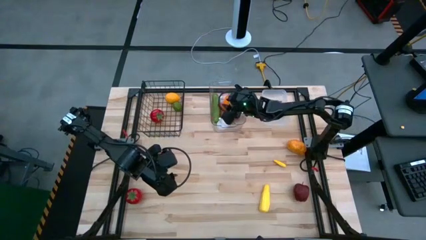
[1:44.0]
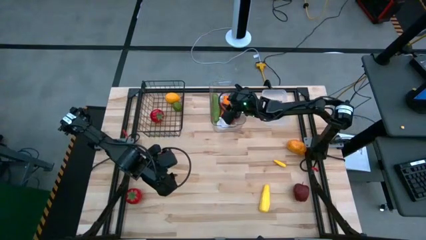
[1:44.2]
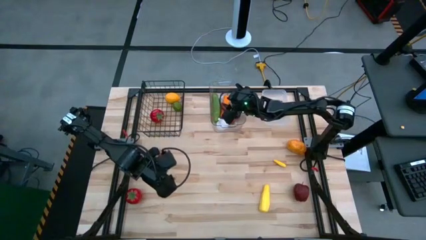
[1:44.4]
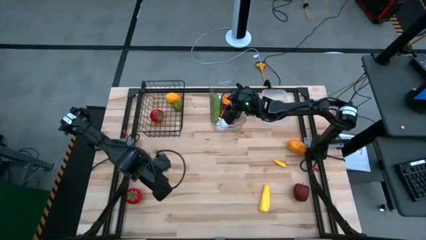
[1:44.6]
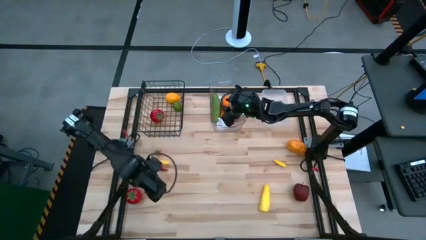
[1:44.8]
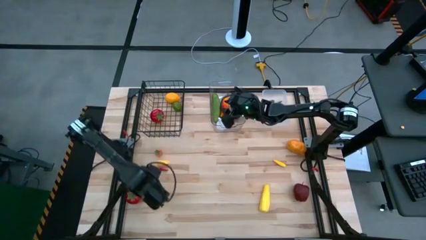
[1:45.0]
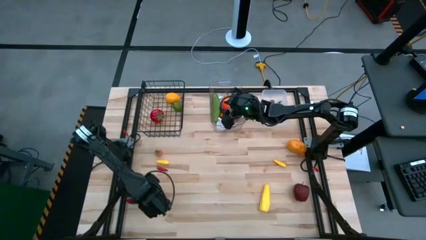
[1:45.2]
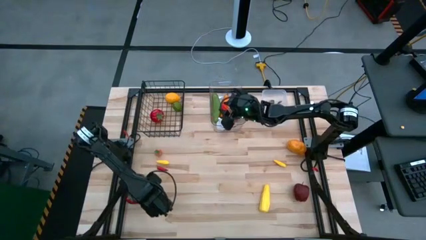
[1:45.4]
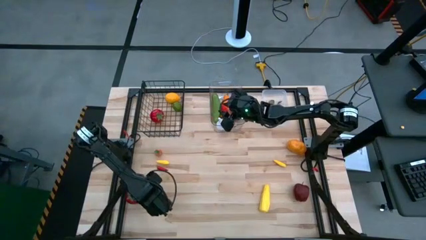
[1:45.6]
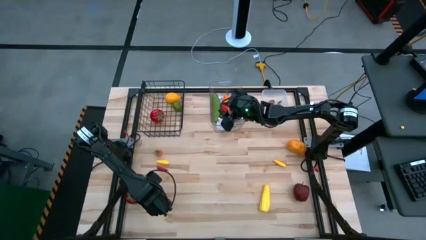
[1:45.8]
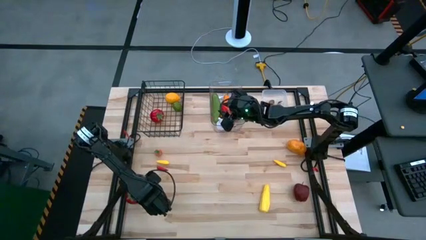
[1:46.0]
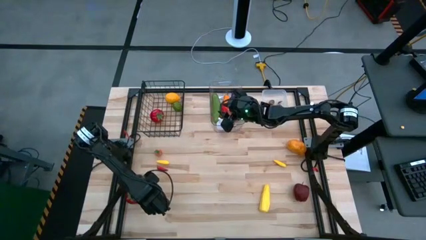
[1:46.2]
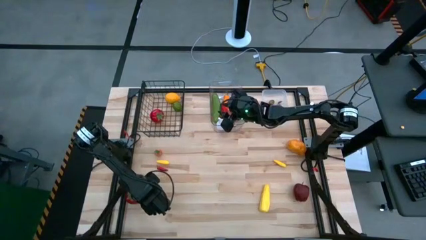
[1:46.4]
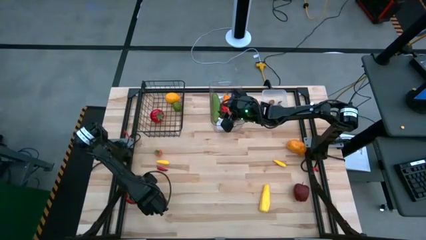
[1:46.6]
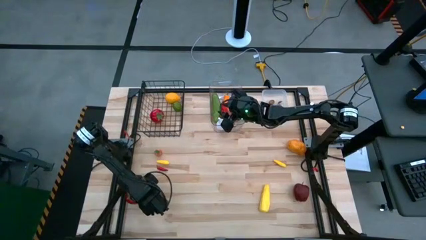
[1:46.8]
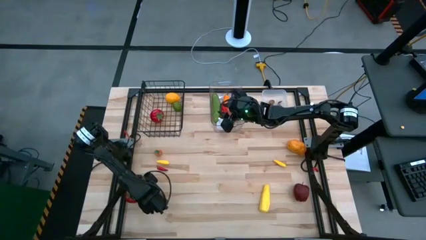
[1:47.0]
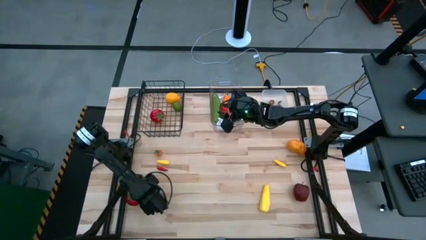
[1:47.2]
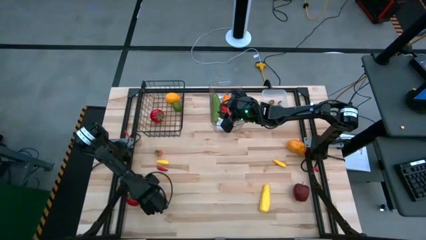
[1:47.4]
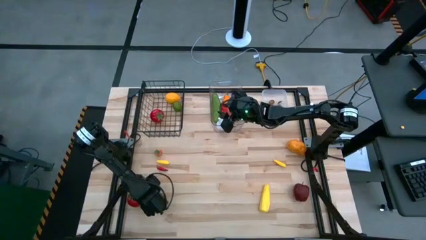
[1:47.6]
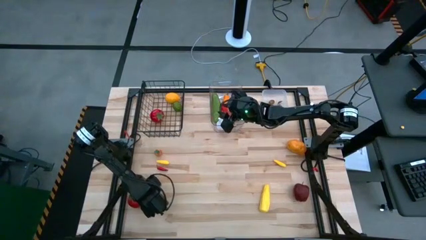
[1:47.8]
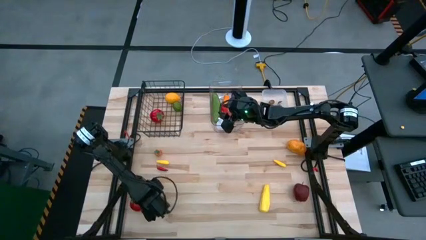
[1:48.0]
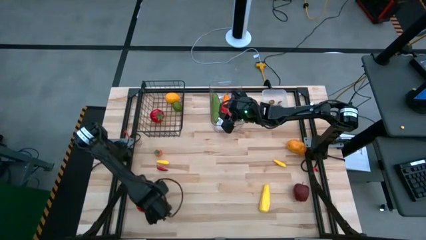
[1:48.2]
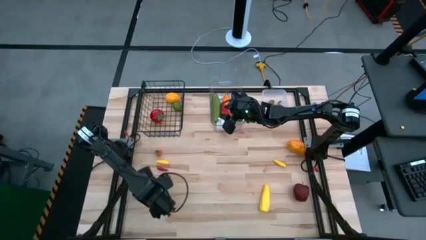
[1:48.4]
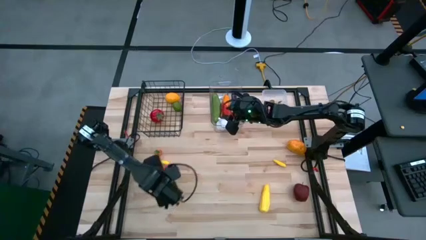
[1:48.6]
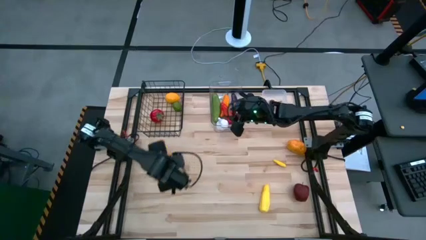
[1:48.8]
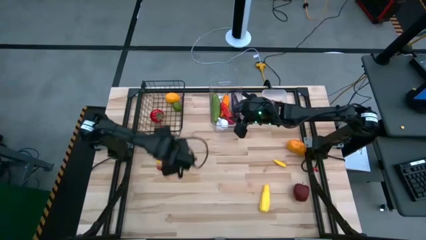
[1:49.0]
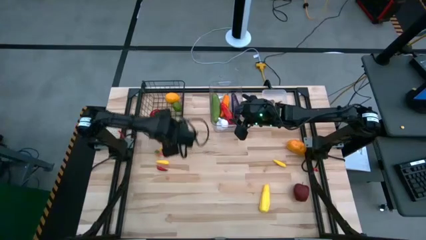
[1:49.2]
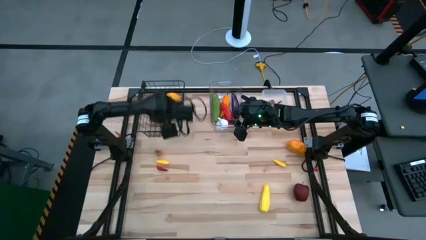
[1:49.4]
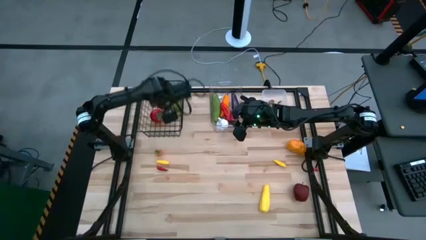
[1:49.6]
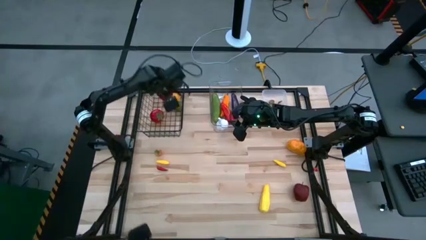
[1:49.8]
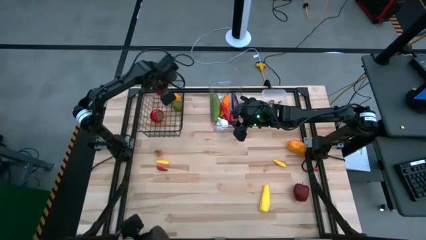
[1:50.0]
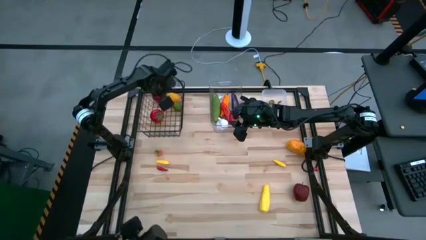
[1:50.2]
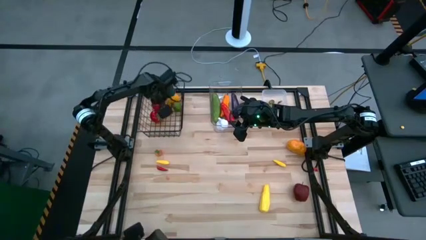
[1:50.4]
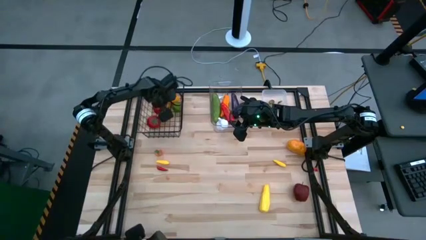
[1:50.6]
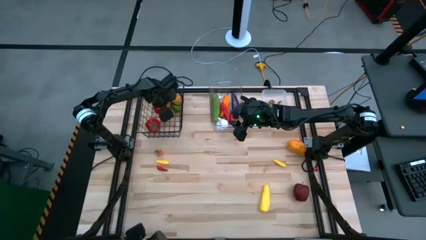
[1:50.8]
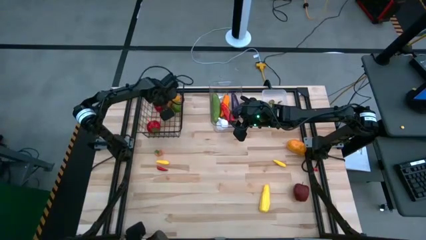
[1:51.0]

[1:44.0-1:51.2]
Task: Sort produce into baskets
Put the red tomato into the black wire basket

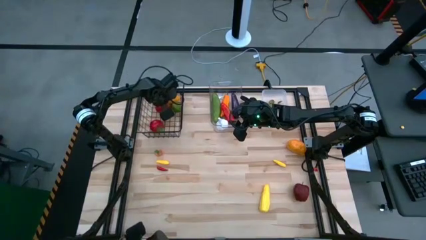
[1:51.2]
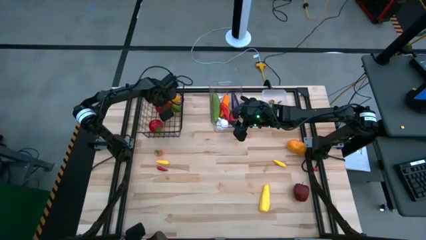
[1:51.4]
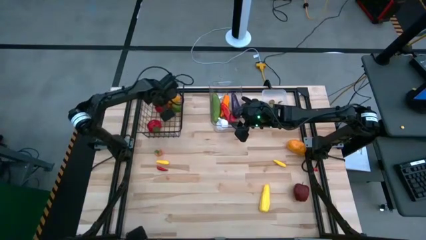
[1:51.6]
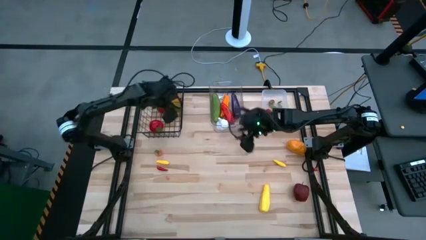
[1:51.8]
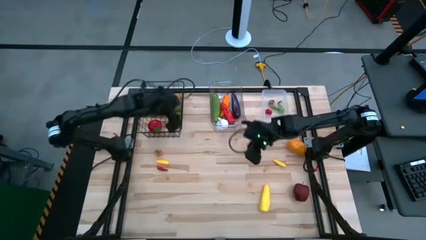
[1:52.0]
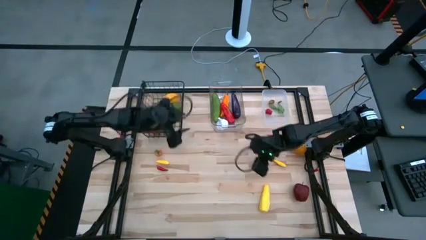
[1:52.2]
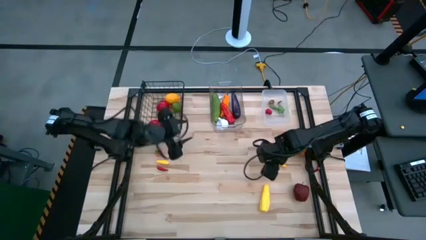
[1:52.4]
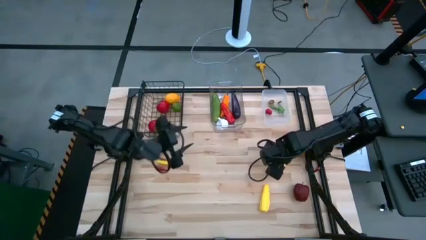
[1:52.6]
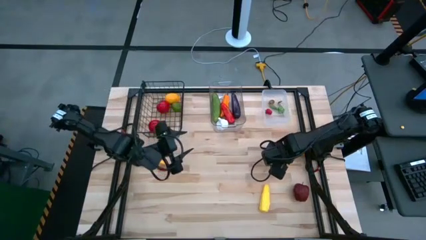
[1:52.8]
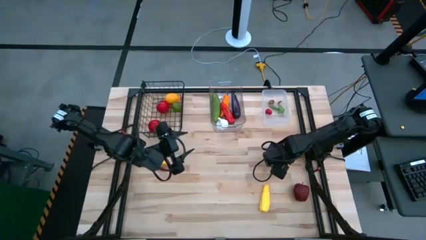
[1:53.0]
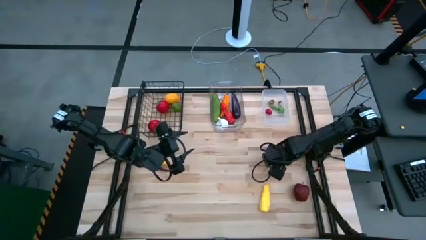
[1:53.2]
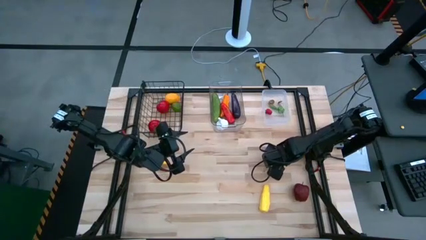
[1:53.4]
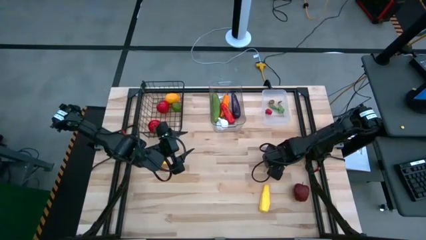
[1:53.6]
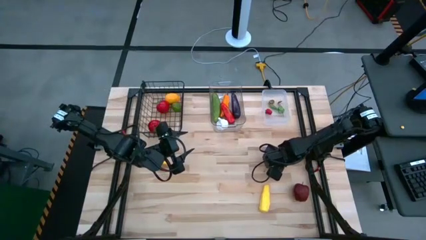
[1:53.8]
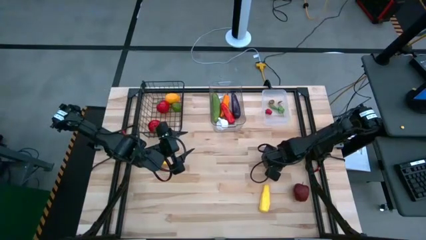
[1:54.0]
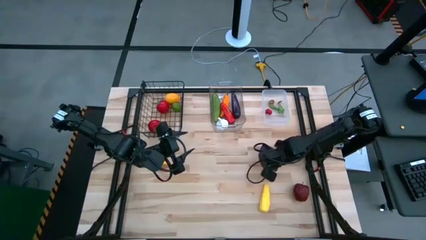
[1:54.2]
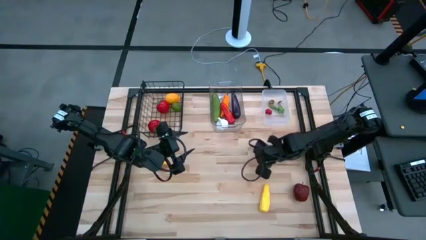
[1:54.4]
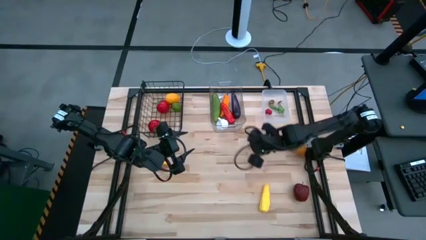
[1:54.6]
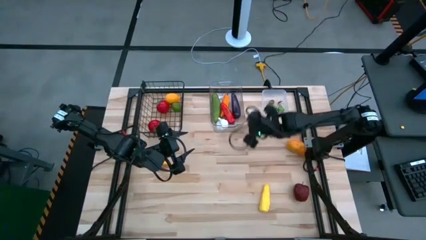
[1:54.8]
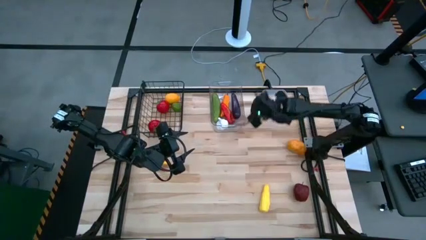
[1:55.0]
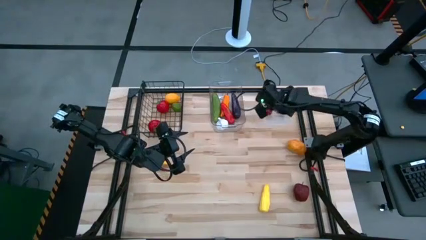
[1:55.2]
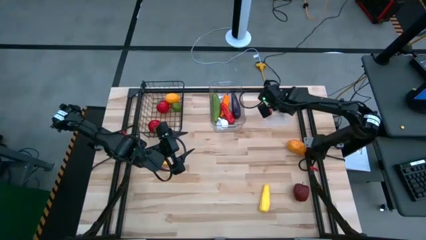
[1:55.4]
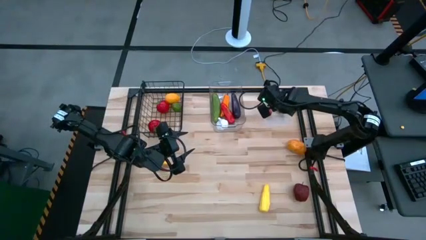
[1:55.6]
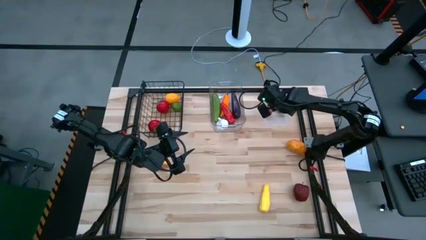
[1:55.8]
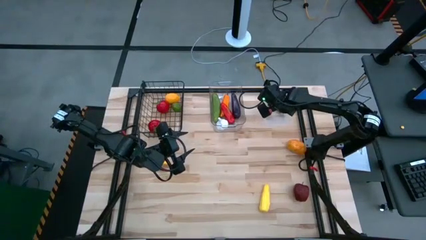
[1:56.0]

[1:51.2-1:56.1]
Put the yellow corn into the right transparent bin

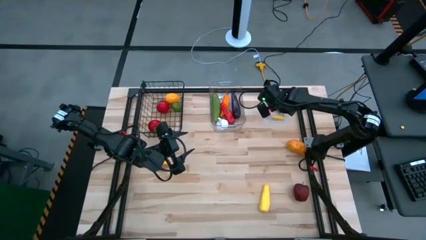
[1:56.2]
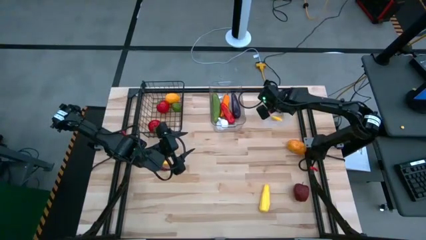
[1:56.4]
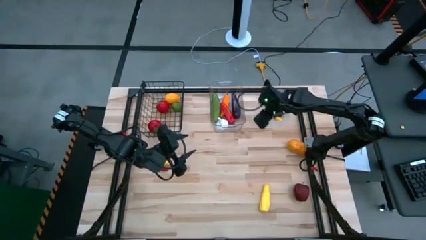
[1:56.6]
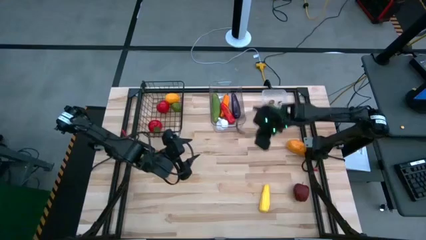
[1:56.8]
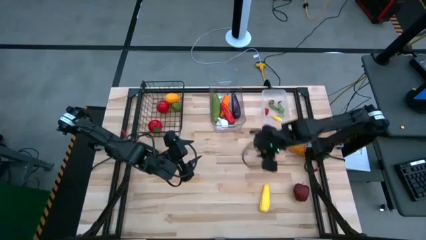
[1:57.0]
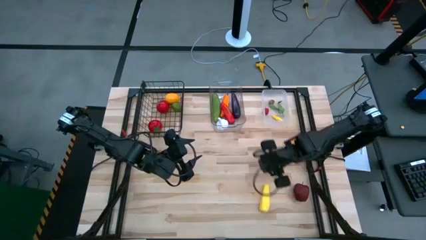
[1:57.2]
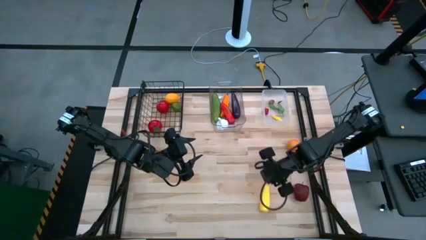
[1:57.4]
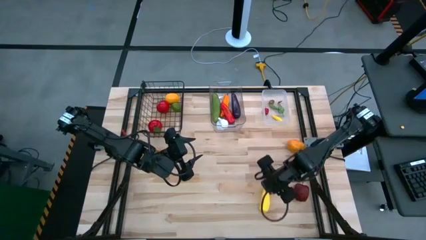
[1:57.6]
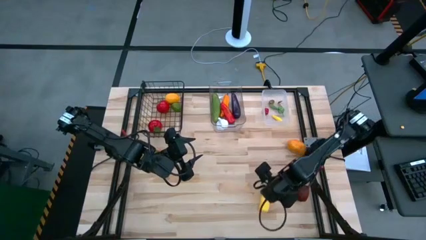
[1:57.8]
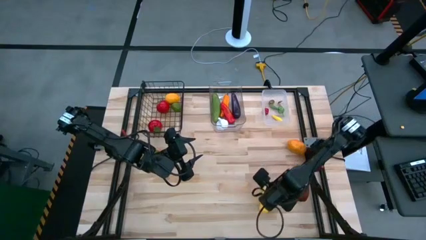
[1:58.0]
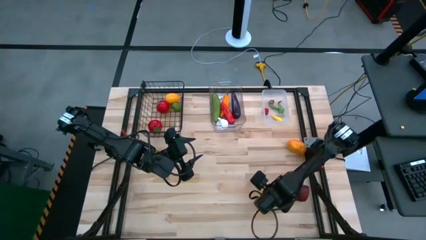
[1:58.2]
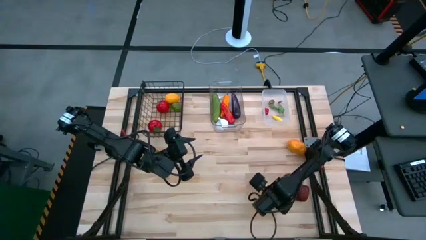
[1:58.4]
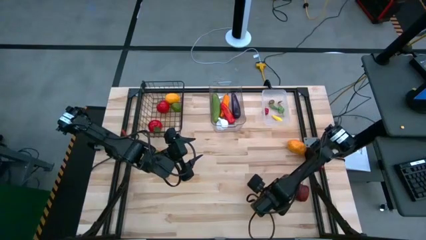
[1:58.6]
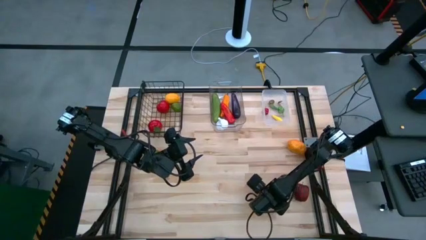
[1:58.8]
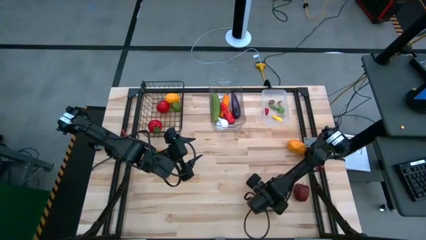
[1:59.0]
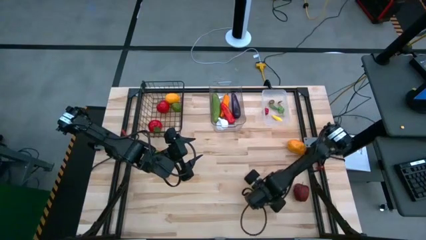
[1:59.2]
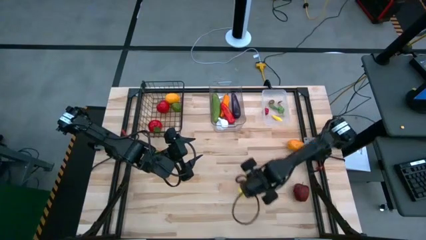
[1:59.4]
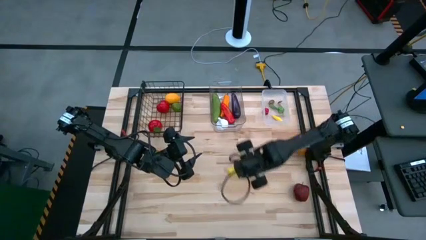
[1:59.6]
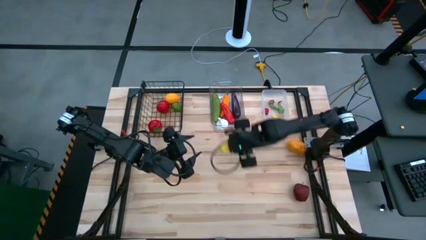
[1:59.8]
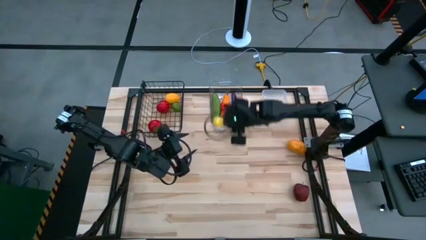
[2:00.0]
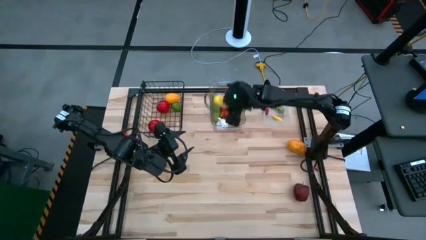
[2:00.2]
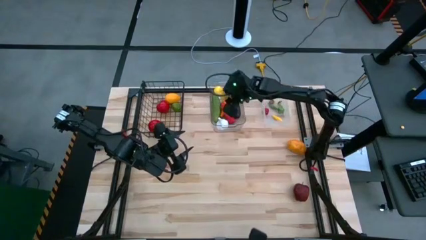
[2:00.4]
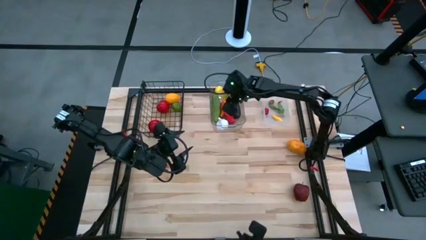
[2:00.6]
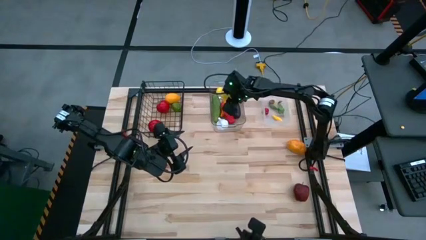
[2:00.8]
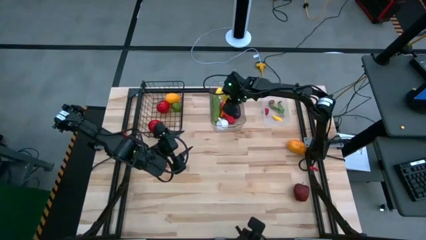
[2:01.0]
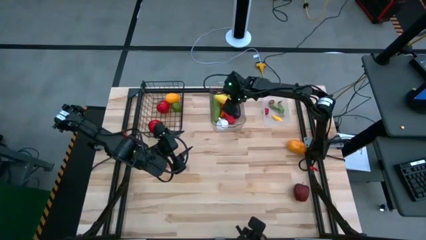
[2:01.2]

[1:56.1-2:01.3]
Put the yellow corn into the left transparent bin
